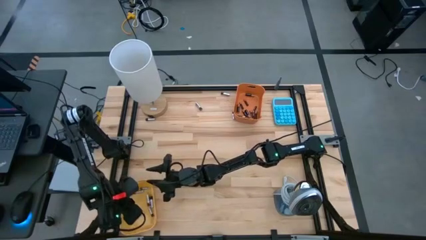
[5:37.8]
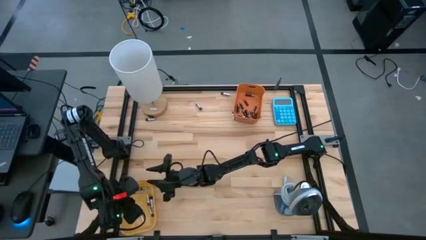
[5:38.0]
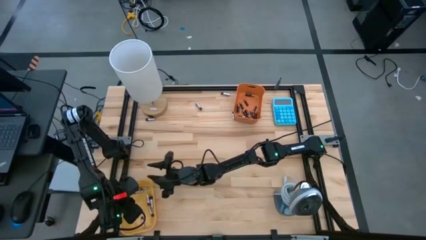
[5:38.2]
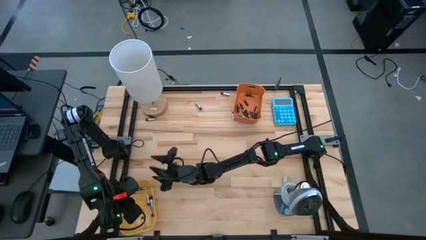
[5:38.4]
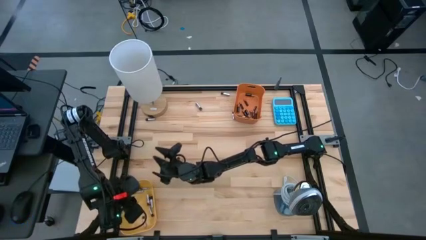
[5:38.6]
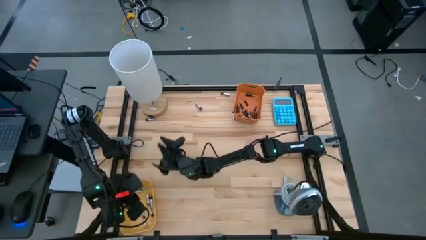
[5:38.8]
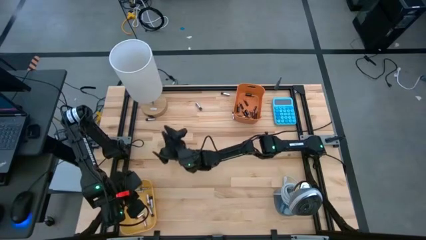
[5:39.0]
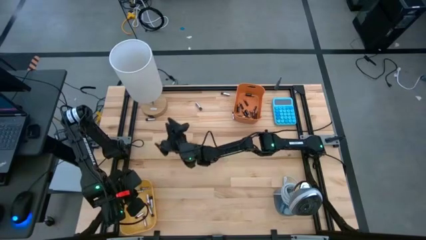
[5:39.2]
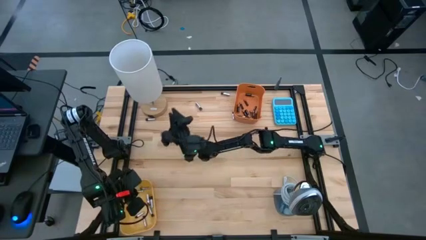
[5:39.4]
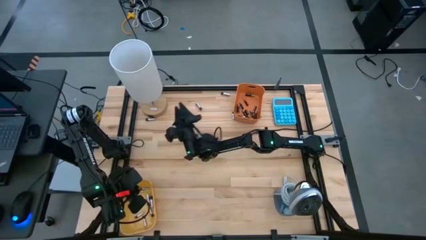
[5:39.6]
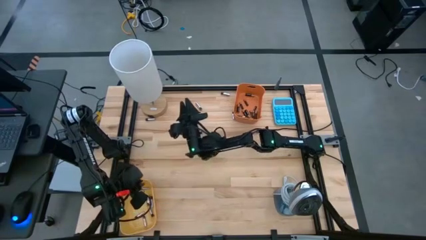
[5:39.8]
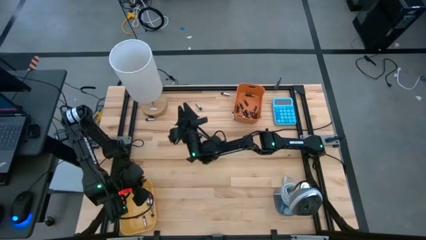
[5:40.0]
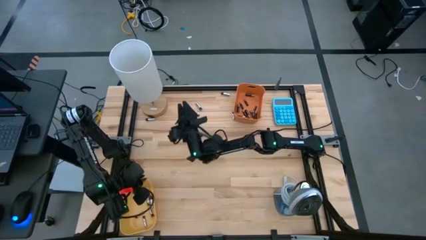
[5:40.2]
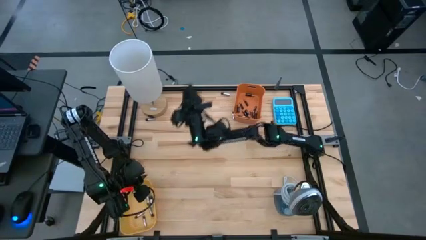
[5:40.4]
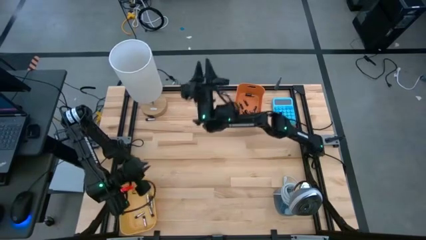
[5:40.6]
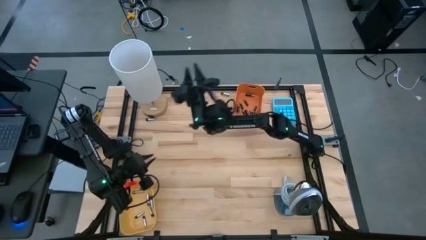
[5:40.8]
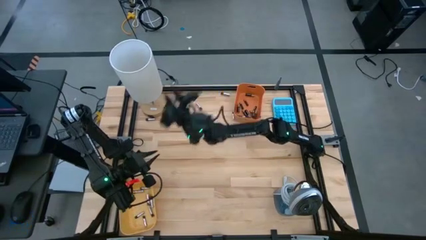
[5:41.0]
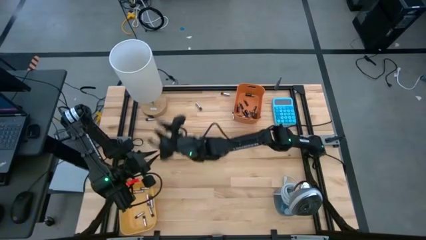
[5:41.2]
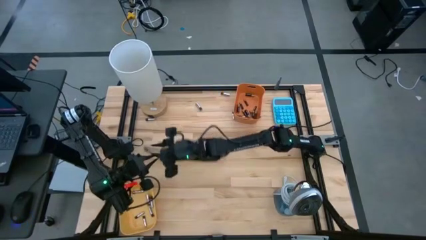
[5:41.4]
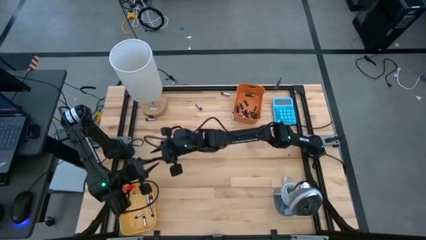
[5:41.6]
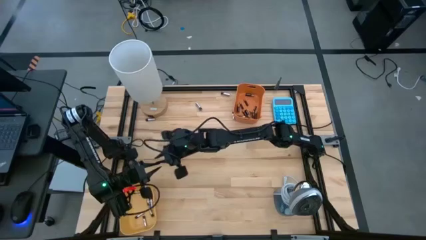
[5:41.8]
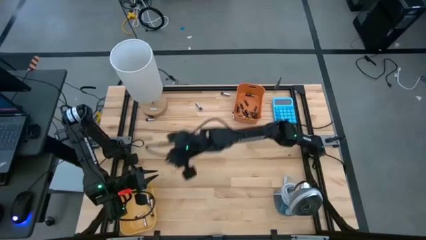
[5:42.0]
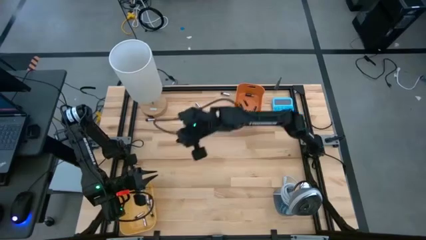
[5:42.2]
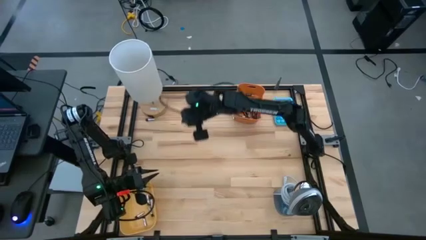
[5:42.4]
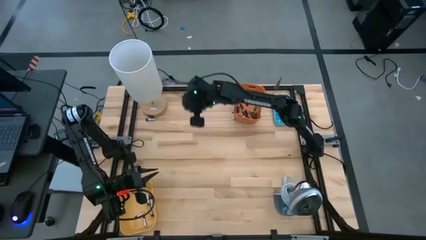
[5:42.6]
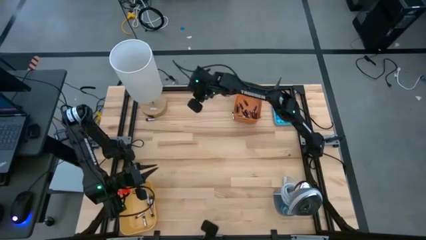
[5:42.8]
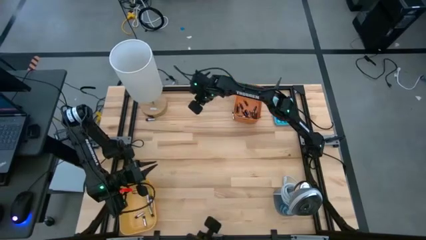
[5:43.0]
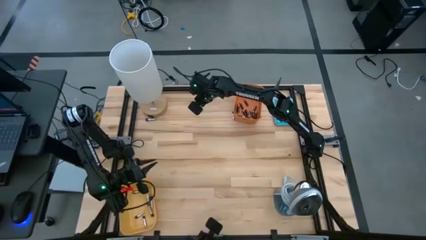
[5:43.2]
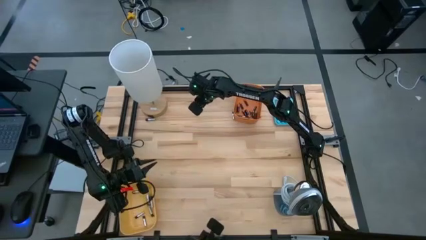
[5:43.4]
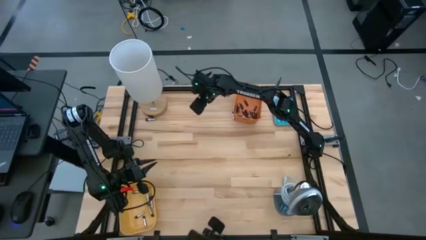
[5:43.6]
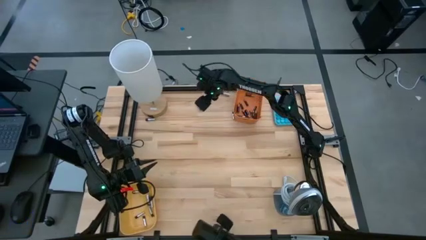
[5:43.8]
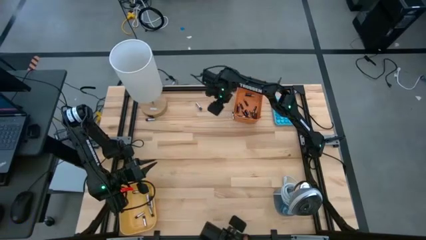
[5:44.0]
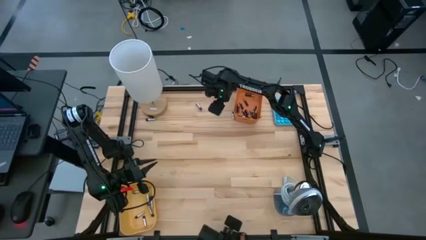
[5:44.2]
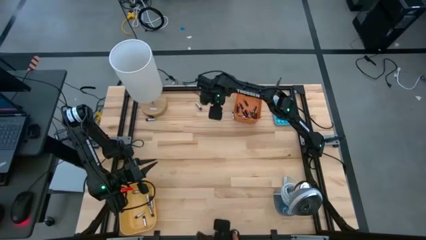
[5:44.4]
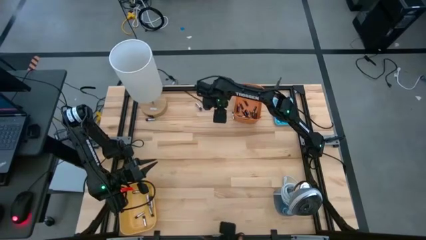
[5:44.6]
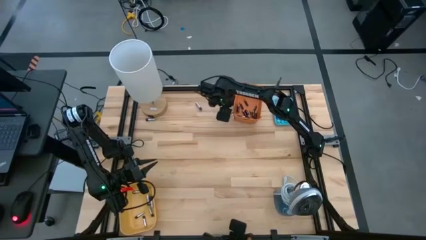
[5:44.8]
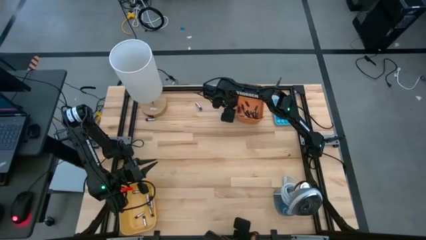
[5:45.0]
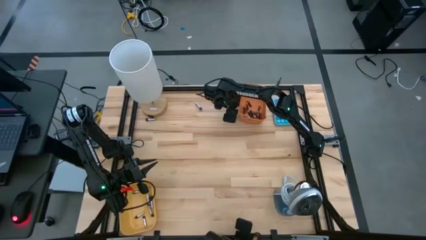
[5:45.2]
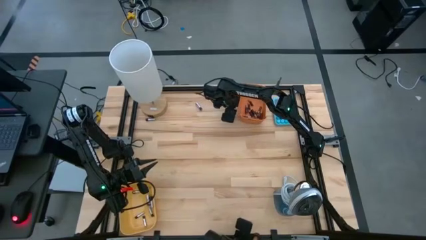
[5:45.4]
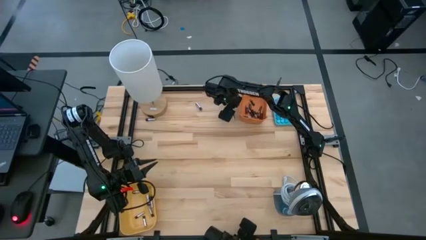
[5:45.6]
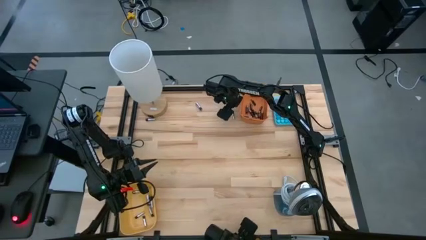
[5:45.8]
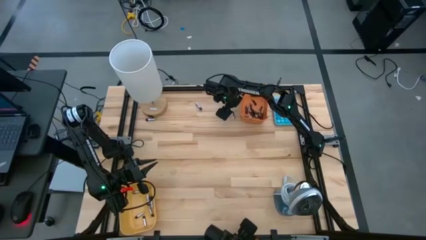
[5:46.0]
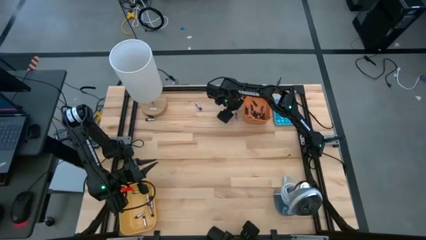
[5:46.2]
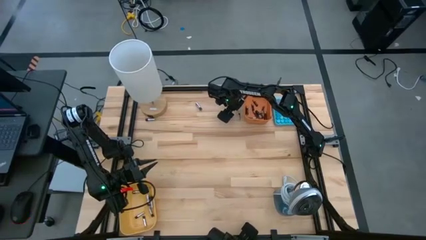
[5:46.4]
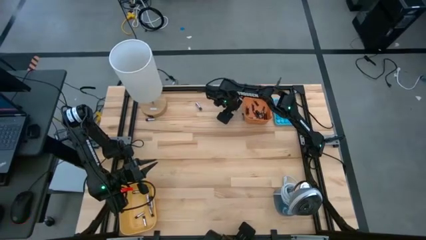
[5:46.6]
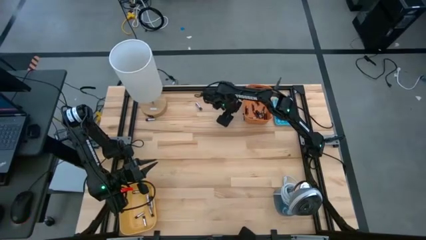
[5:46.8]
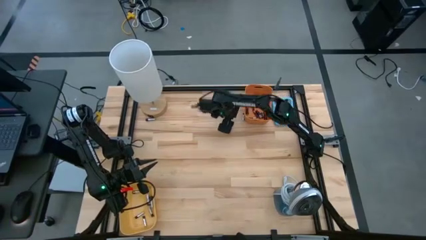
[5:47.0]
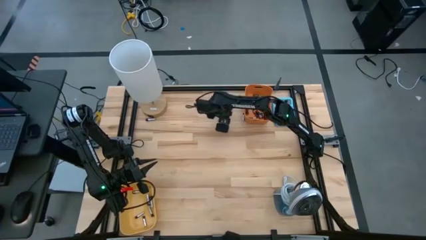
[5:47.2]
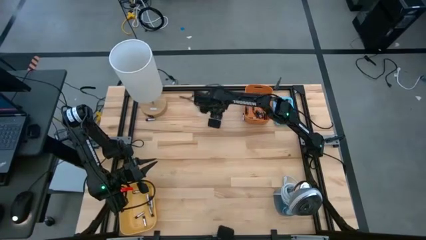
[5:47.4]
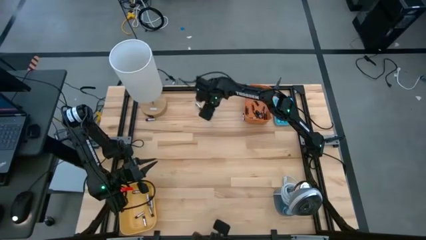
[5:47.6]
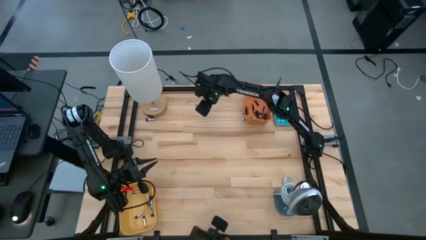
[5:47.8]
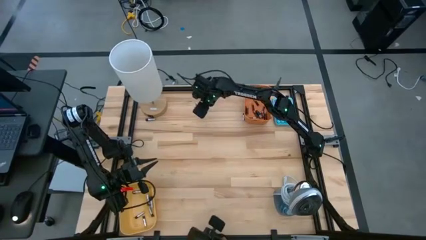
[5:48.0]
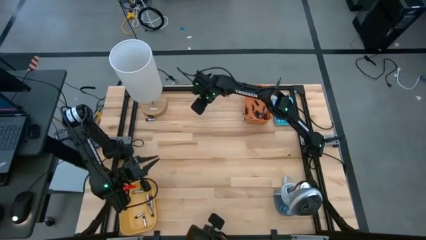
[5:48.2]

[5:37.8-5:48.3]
Task: Sort batteries
Put the silver battery into the yellow bin

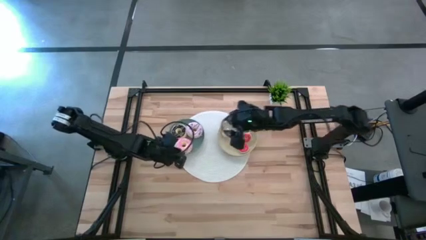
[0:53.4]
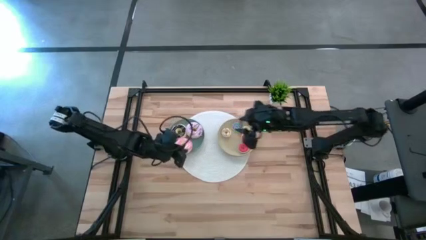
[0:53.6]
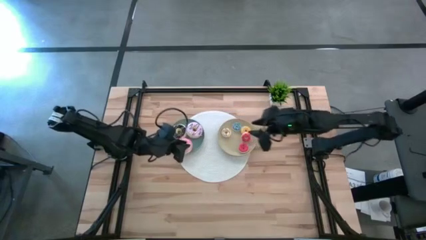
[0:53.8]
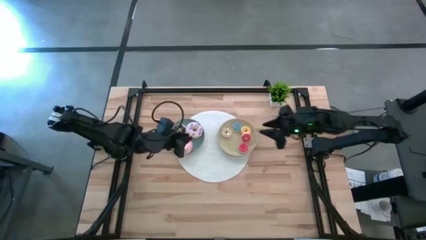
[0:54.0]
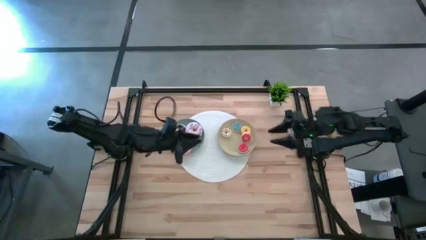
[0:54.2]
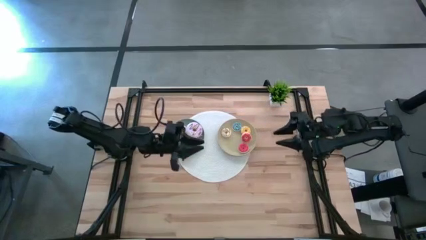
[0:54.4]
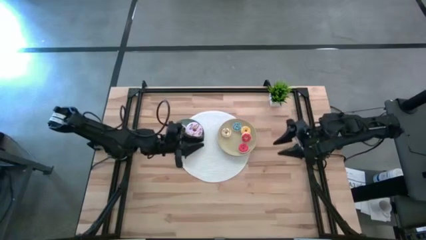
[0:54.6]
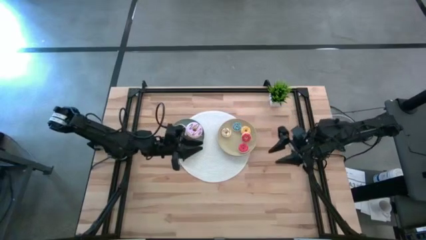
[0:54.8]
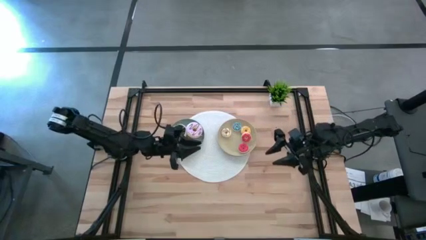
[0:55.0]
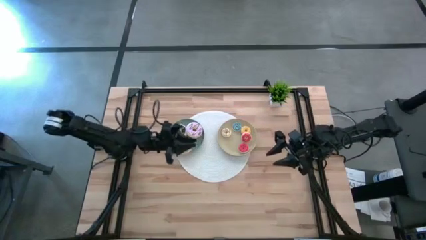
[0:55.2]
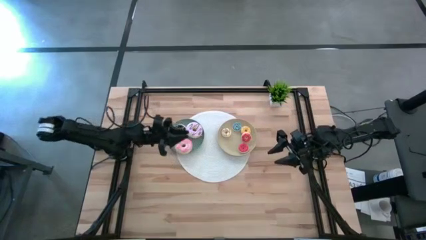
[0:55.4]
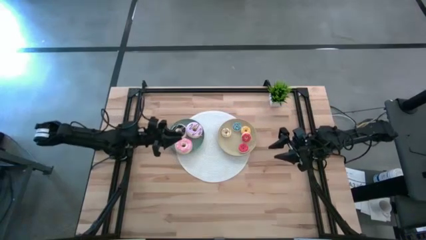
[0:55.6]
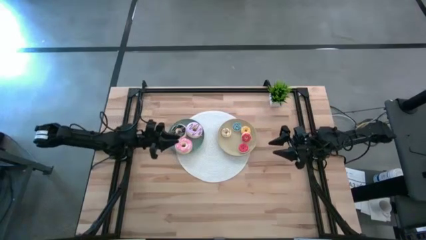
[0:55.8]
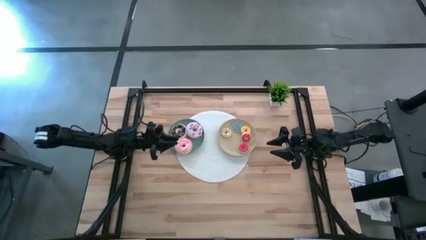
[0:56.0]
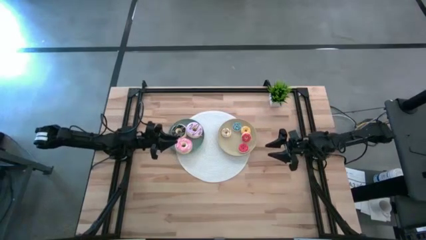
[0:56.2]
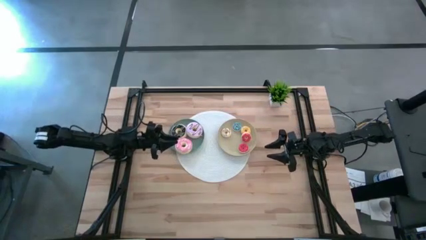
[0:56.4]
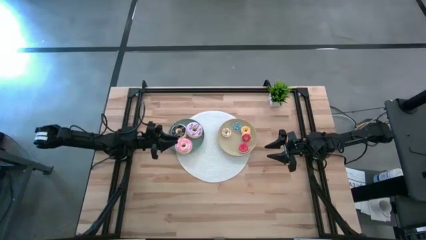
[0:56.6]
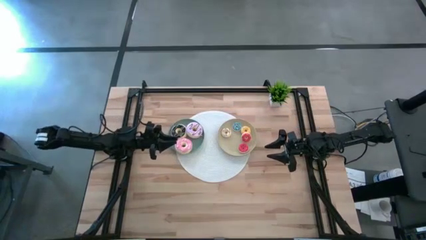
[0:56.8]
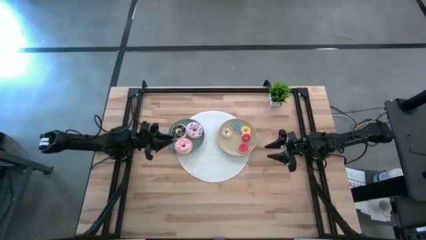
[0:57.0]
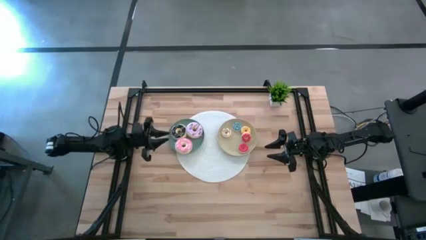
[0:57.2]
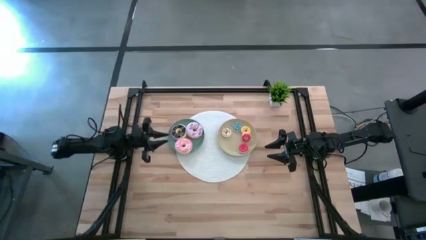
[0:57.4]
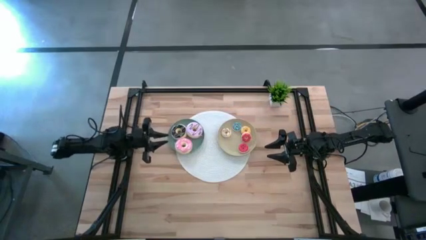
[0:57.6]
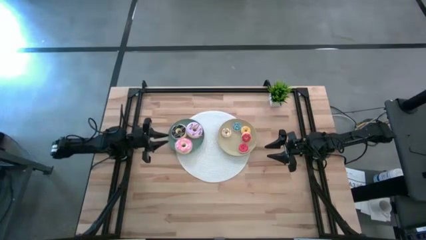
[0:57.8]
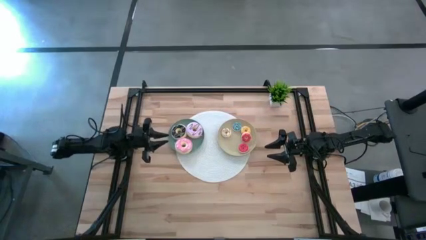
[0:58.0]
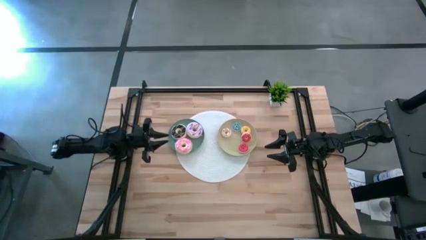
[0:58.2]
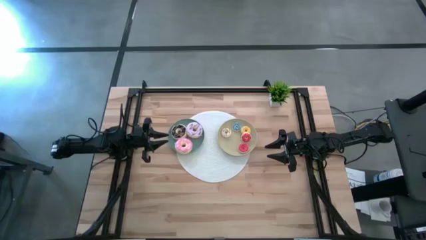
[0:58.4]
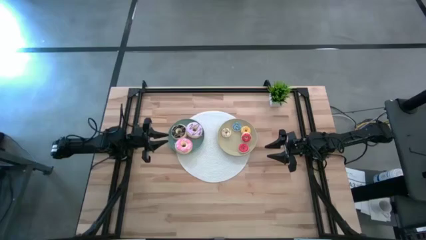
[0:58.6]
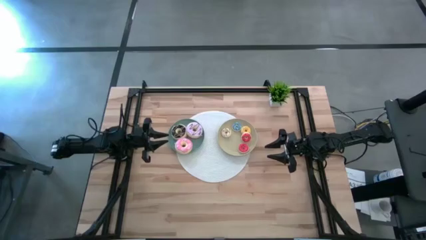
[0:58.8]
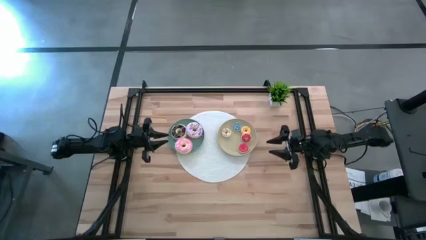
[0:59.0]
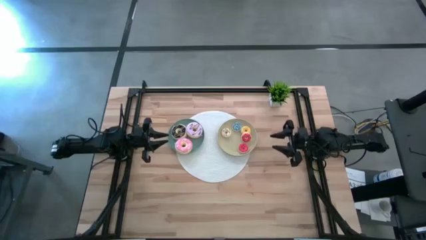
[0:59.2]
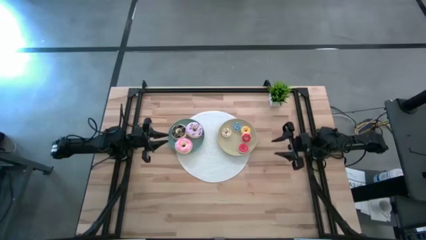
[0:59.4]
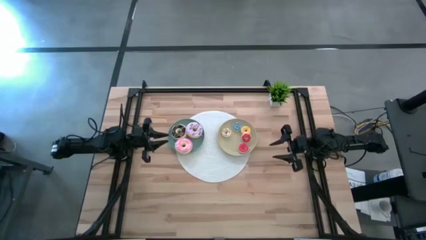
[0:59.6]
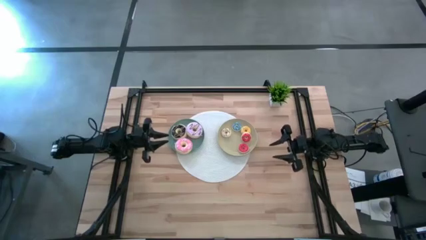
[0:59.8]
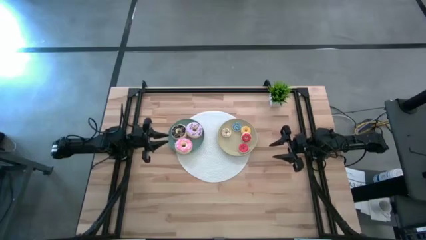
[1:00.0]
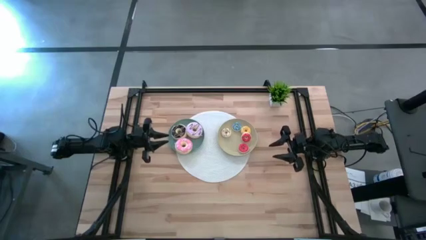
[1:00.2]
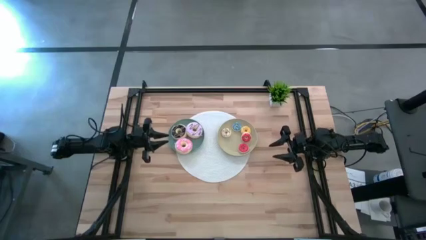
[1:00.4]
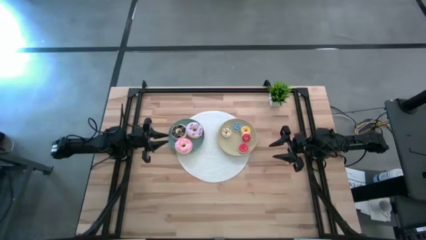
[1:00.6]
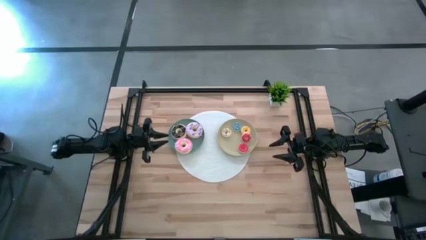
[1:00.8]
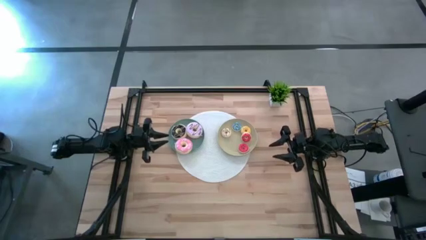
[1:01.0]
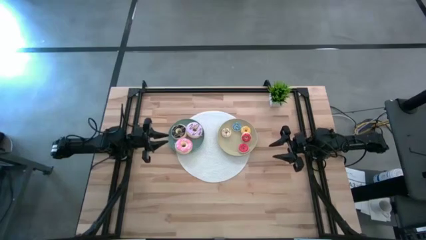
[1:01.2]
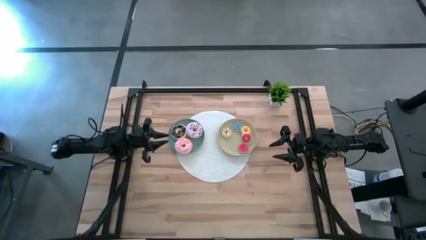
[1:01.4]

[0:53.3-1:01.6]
Task: Pick & Place donuts
Return to Home Position
